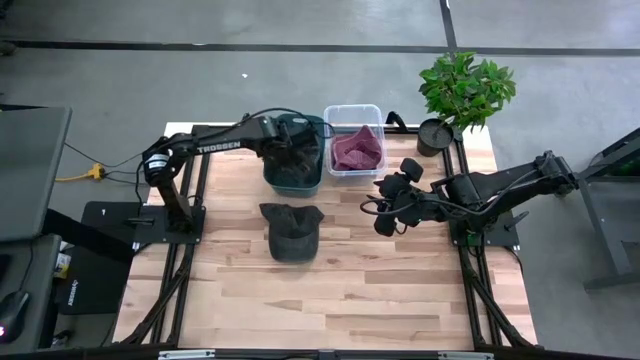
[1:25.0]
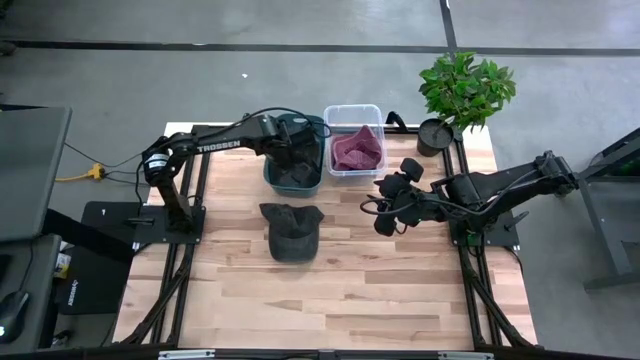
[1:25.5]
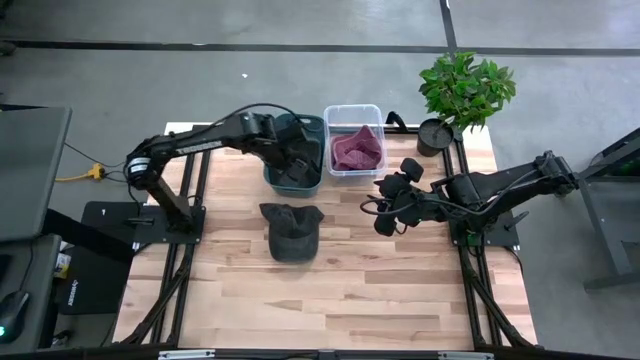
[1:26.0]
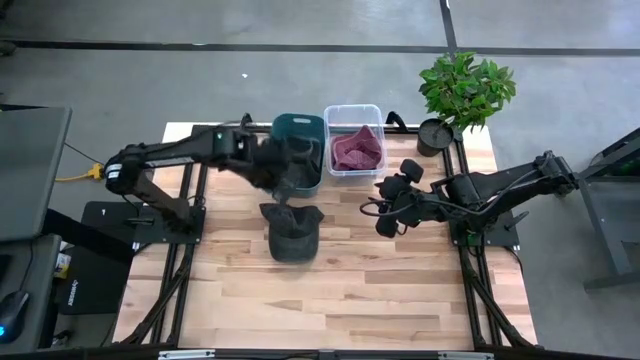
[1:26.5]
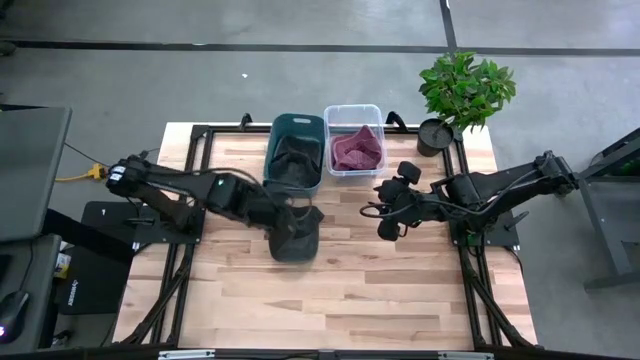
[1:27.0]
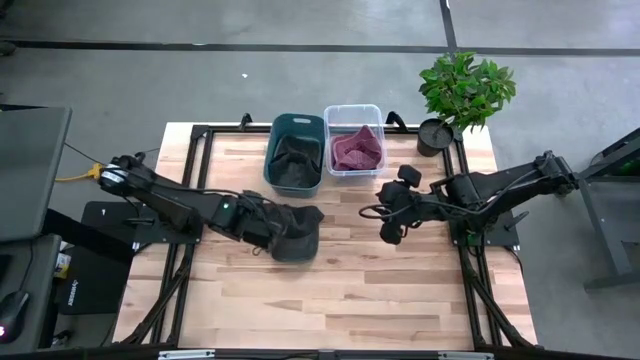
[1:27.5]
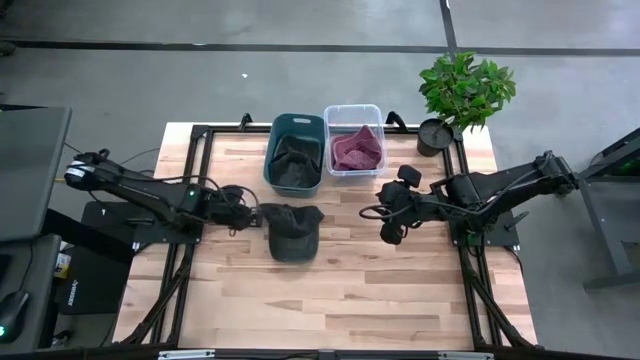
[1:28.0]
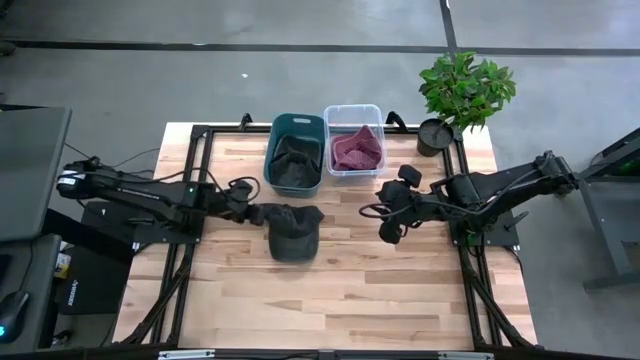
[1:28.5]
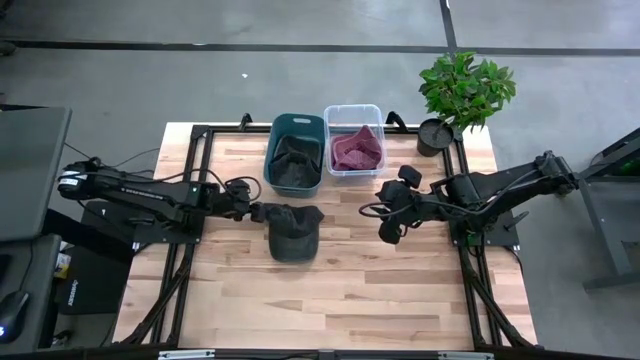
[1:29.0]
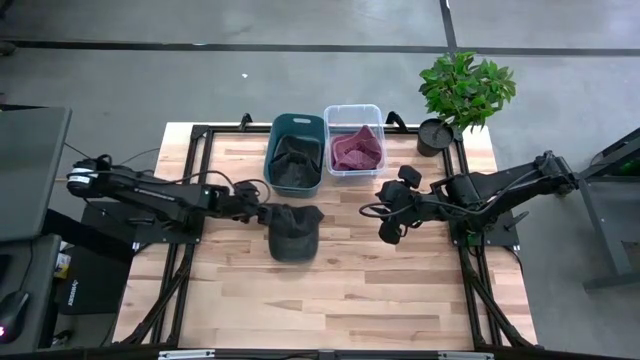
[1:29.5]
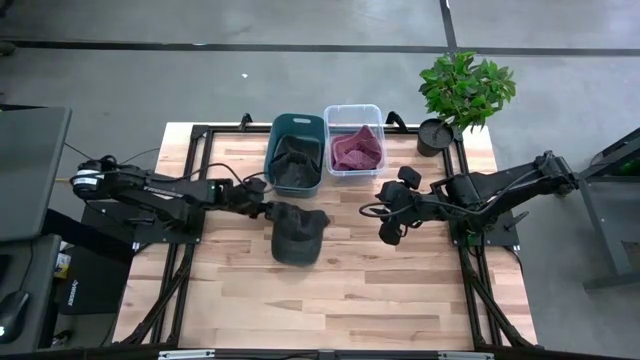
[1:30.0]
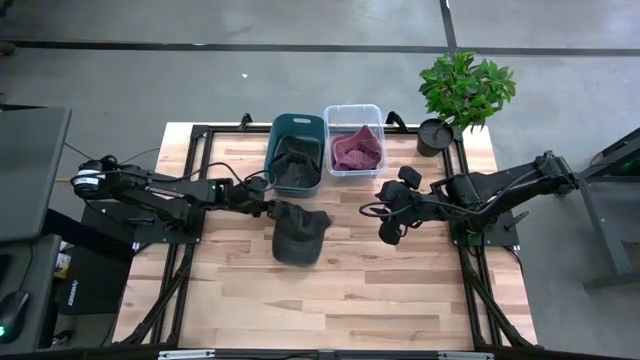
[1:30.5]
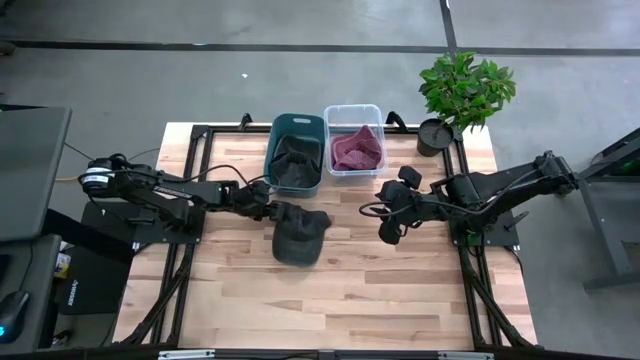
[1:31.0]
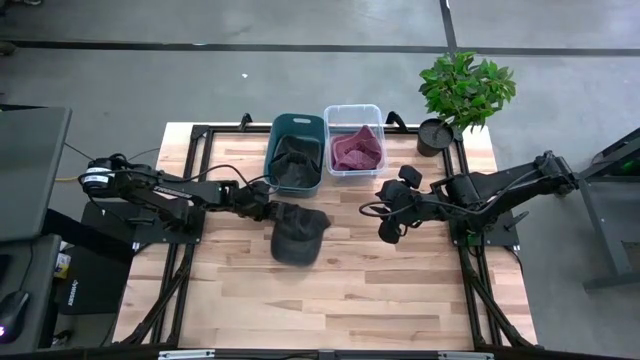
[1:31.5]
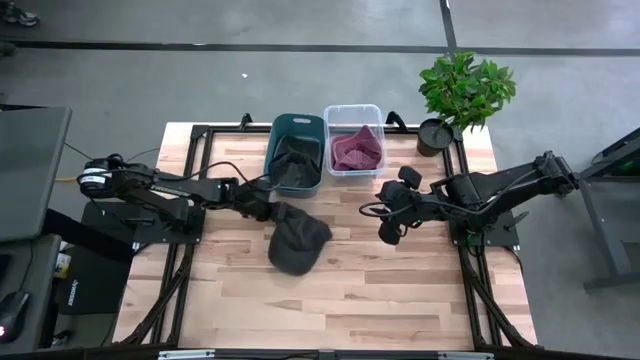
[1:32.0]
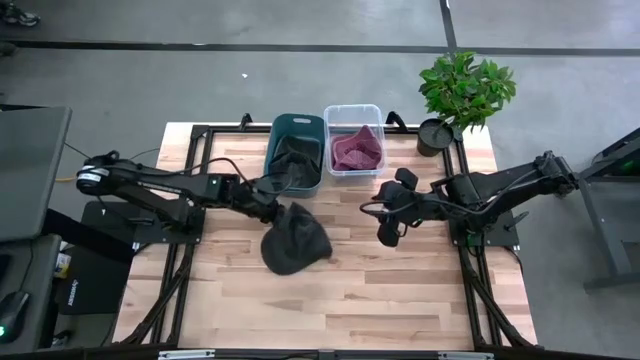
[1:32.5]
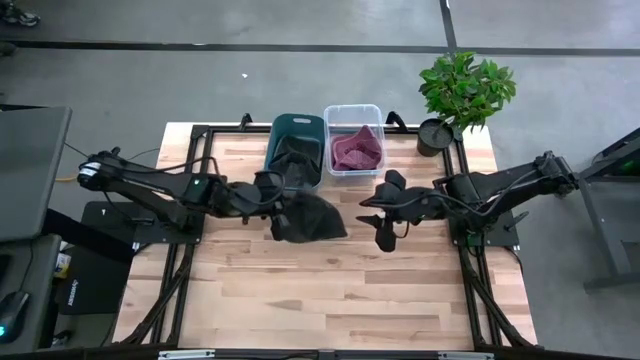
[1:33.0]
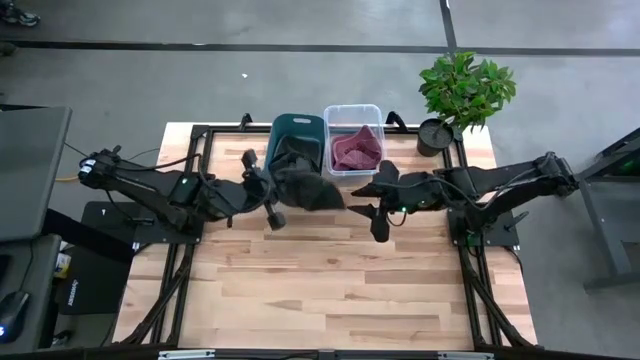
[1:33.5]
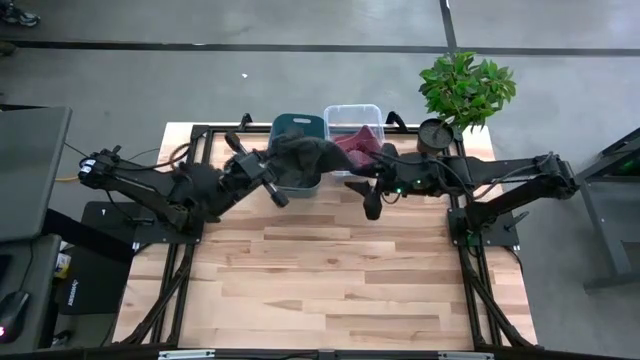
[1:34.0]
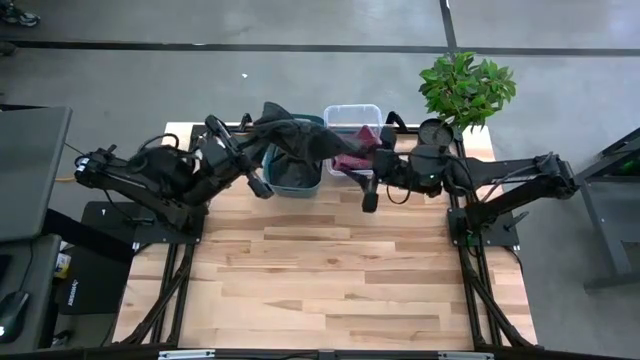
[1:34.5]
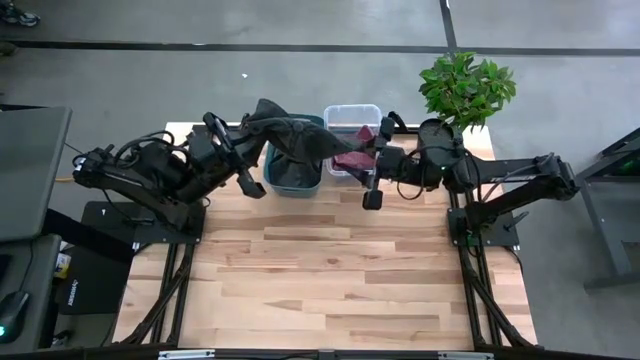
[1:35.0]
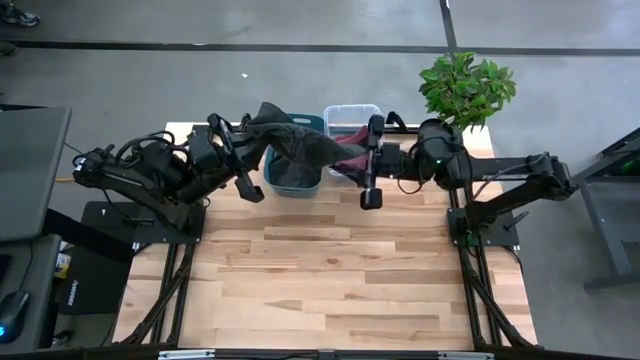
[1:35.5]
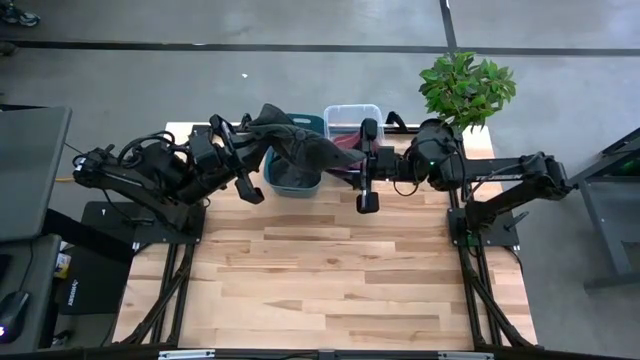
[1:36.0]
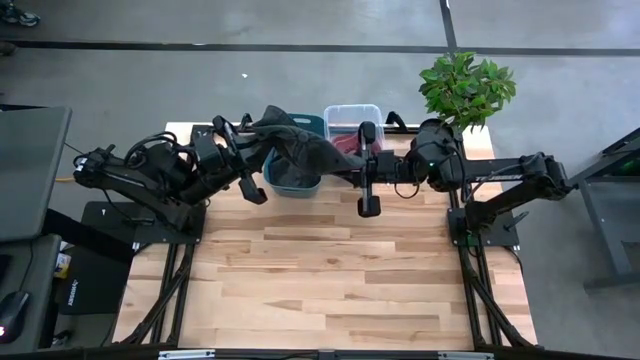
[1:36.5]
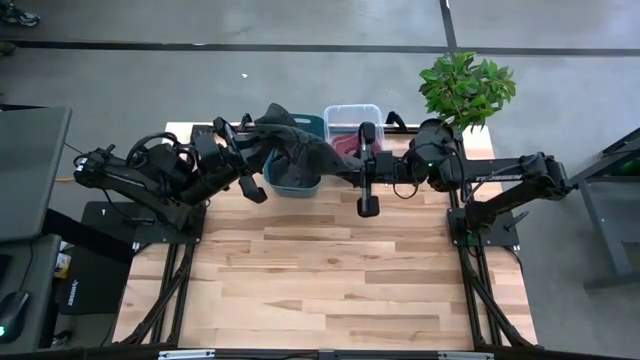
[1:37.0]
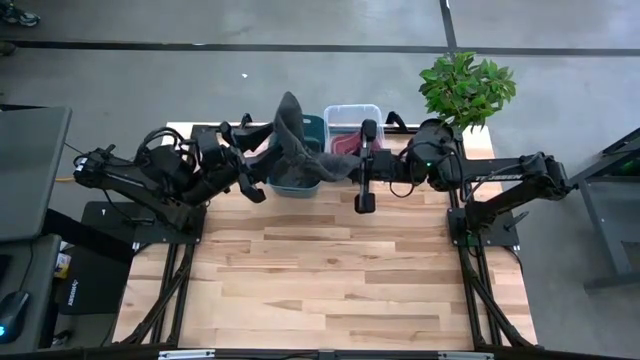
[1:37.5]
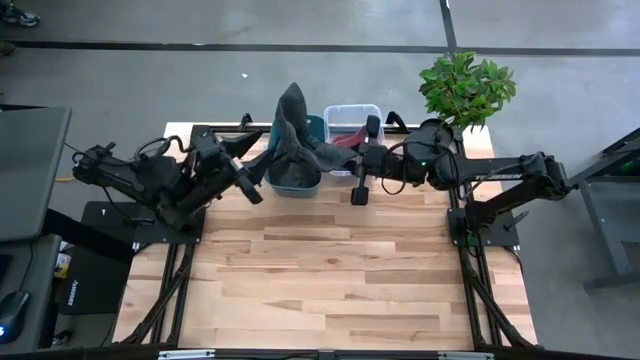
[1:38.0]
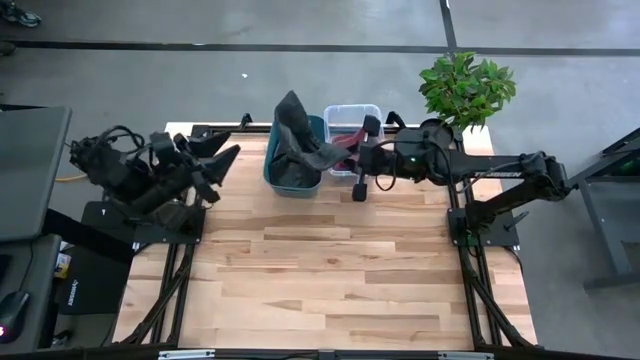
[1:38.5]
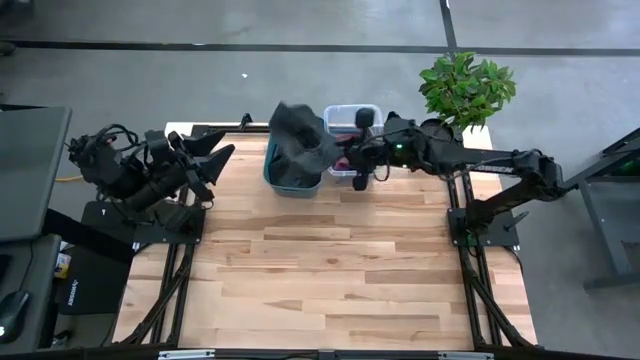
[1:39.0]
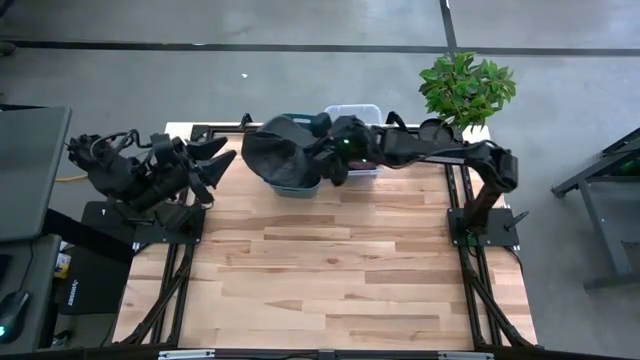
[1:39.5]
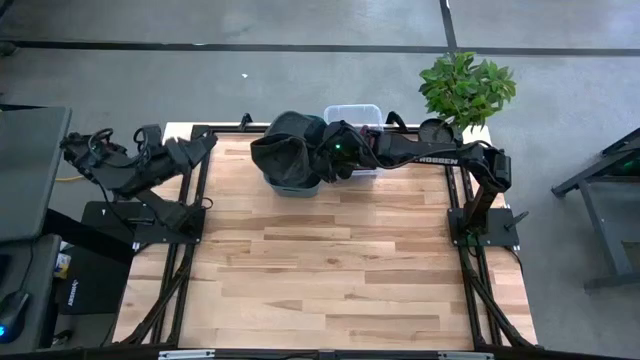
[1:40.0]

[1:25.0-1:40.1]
Task: Pick & Place hat
Put the black cap into the blue bin

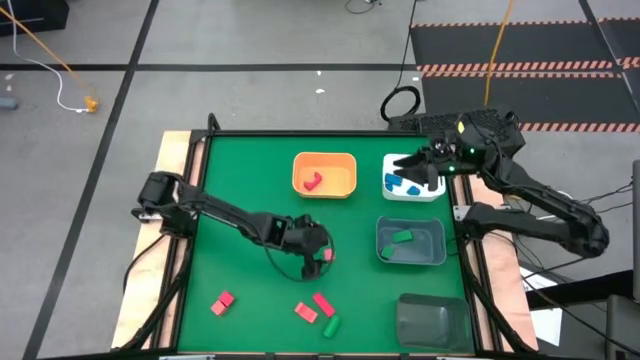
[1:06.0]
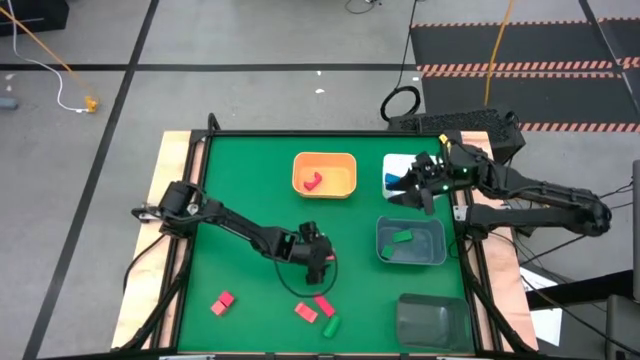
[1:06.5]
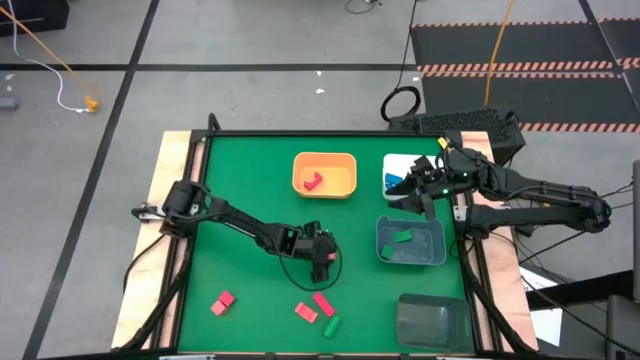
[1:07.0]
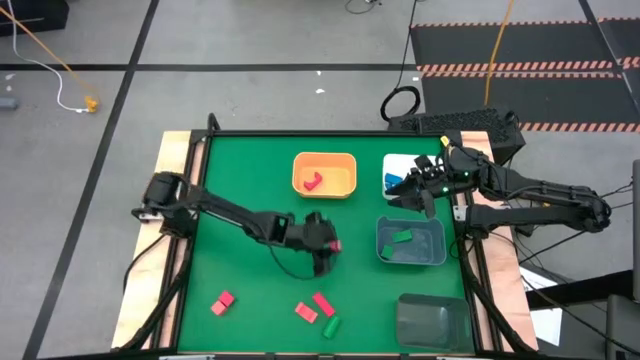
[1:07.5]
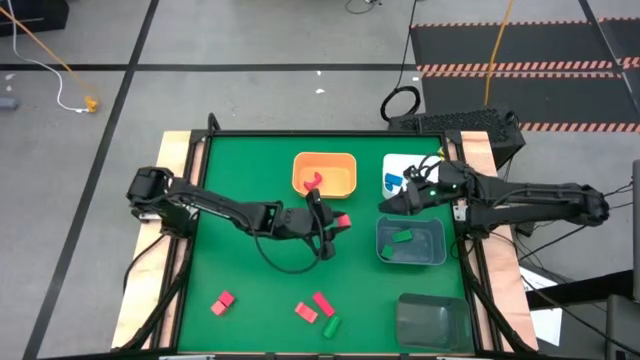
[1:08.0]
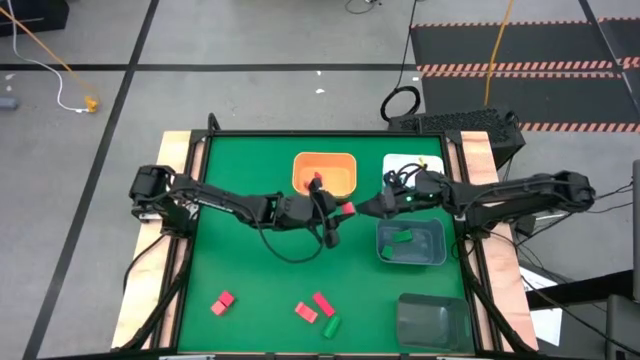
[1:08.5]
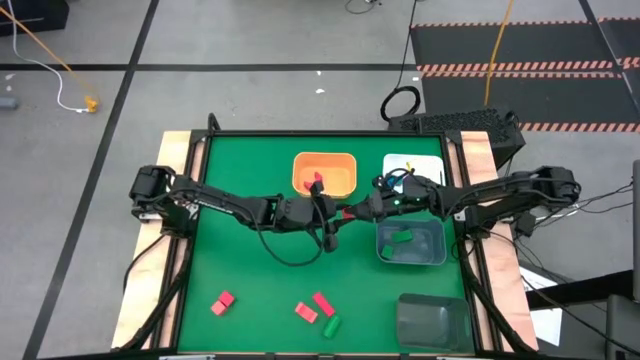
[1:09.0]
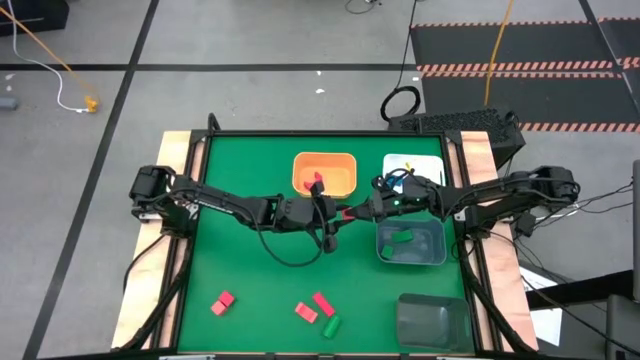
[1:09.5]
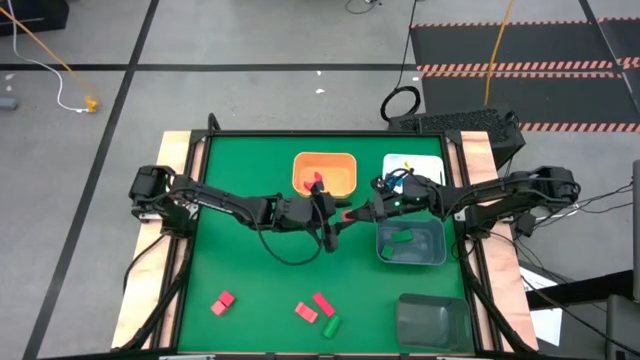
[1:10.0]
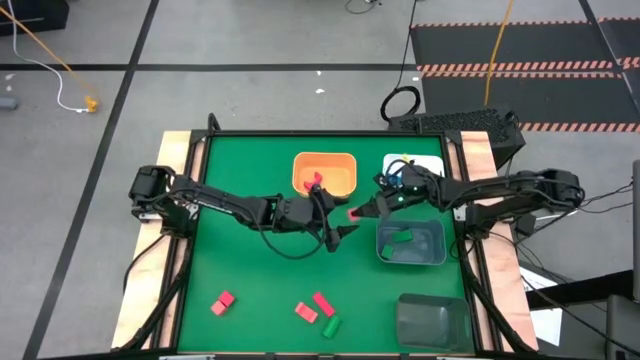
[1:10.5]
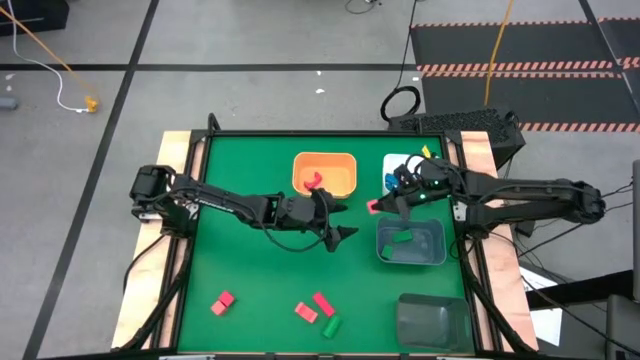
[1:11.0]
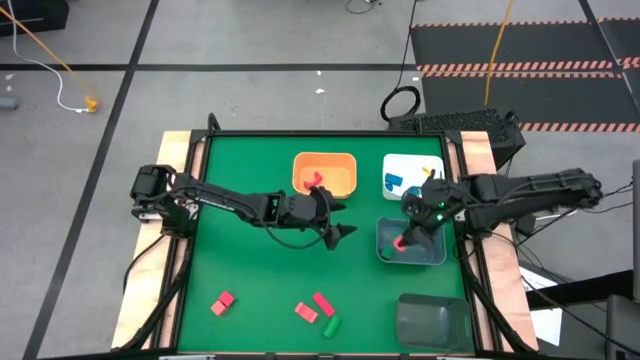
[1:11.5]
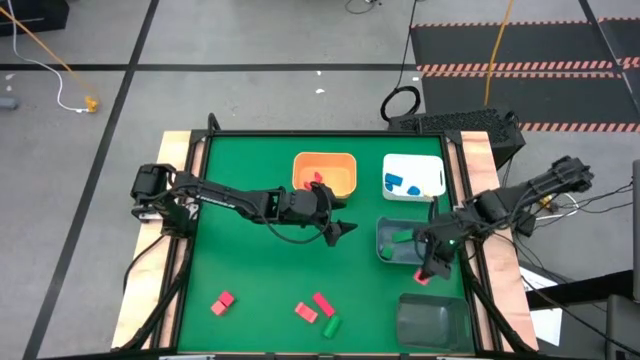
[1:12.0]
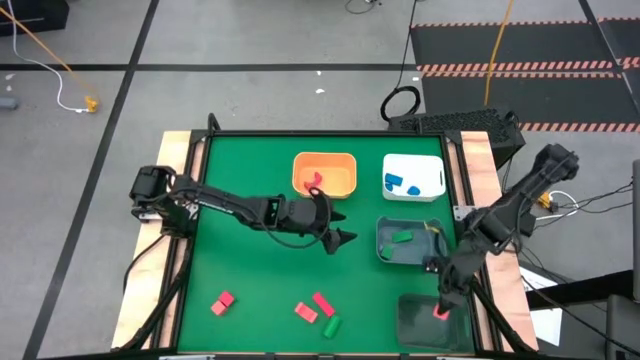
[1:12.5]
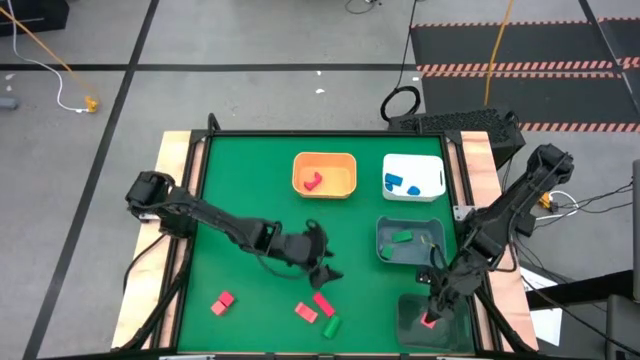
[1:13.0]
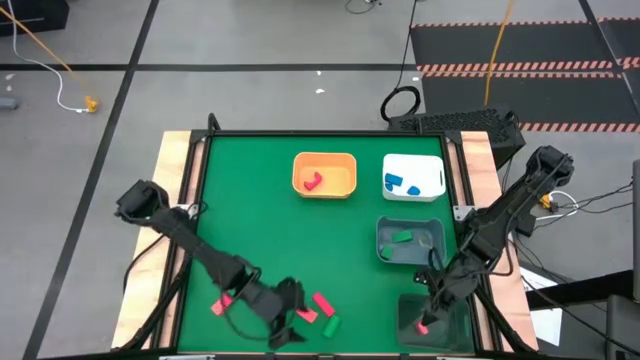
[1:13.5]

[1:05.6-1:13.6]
Task: Sort & place blocks by color
Put the top orange block into the black bin
